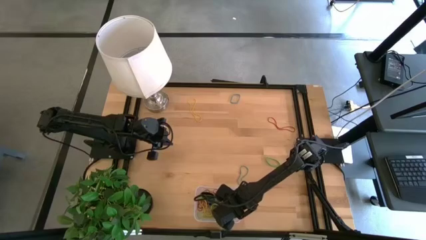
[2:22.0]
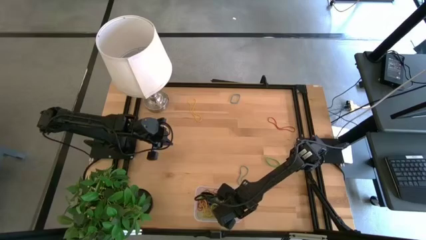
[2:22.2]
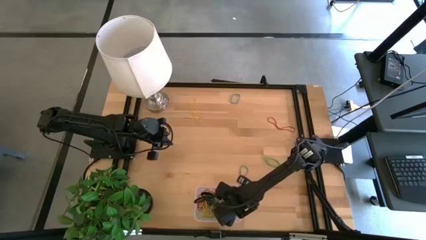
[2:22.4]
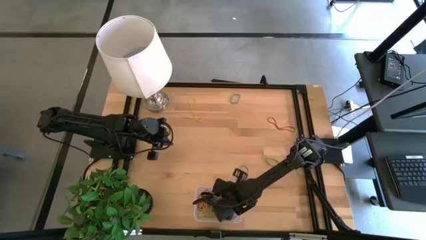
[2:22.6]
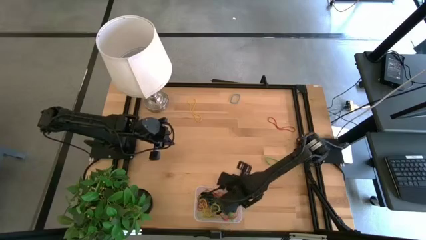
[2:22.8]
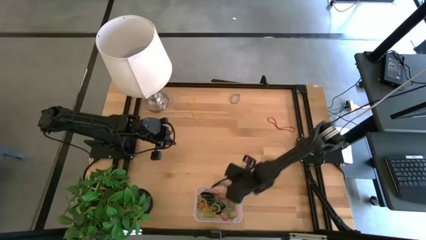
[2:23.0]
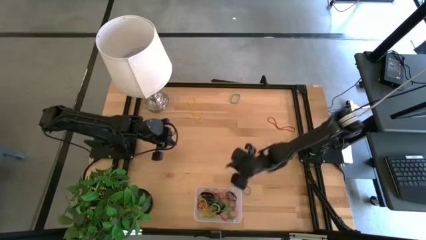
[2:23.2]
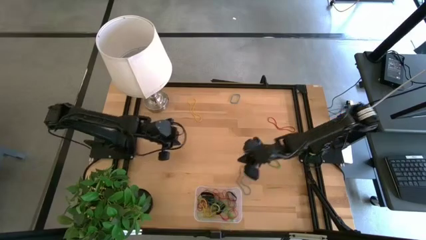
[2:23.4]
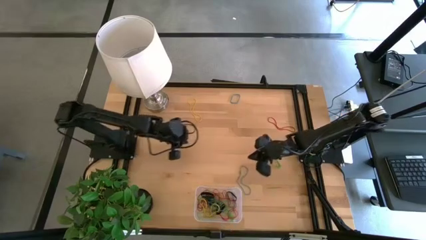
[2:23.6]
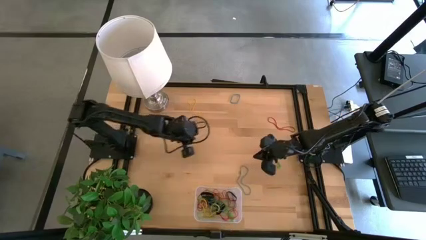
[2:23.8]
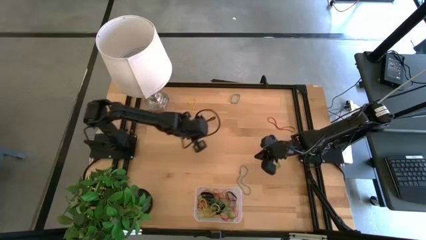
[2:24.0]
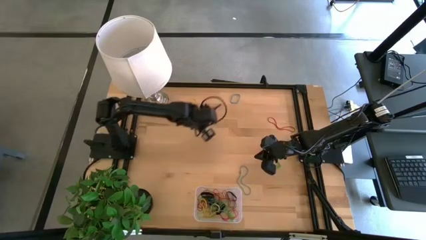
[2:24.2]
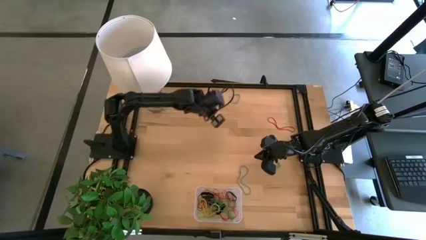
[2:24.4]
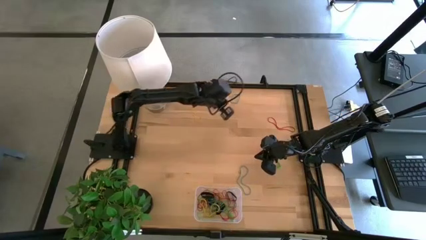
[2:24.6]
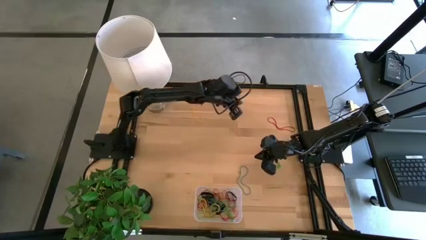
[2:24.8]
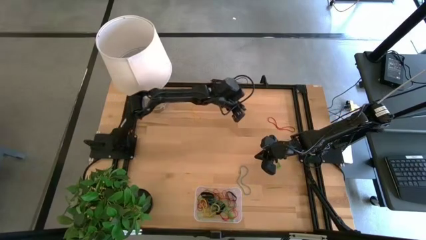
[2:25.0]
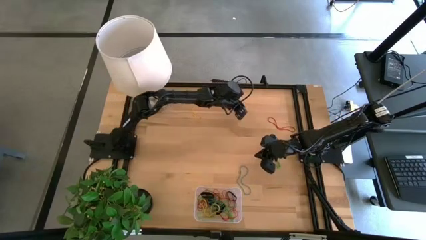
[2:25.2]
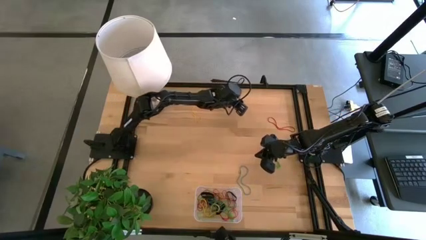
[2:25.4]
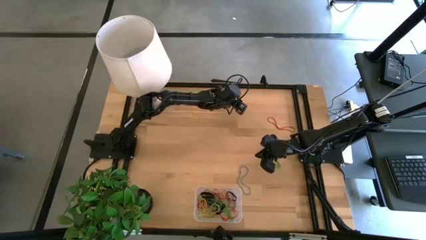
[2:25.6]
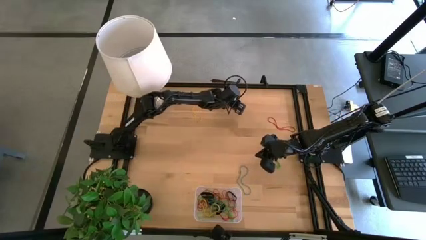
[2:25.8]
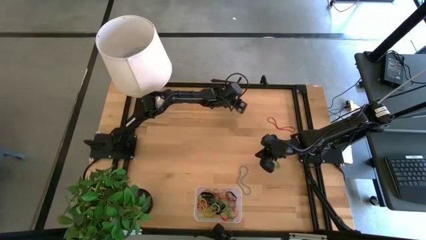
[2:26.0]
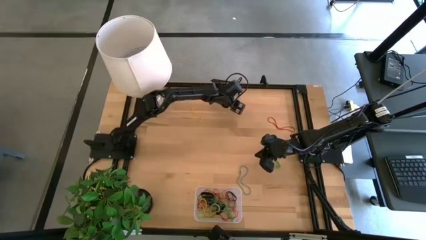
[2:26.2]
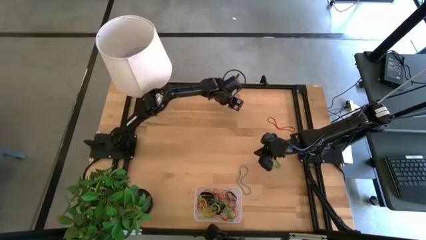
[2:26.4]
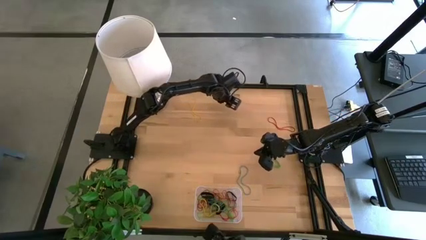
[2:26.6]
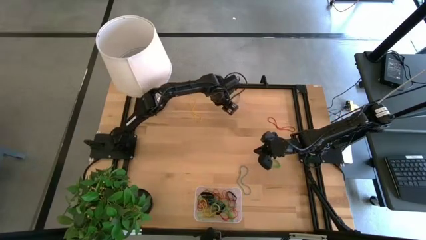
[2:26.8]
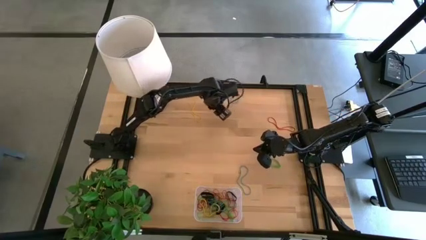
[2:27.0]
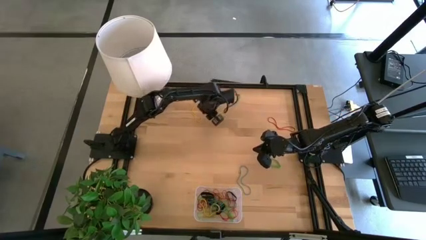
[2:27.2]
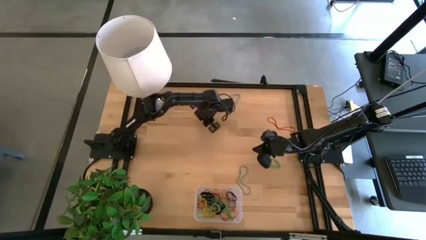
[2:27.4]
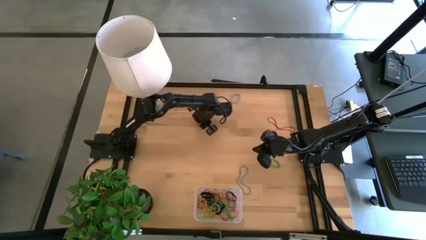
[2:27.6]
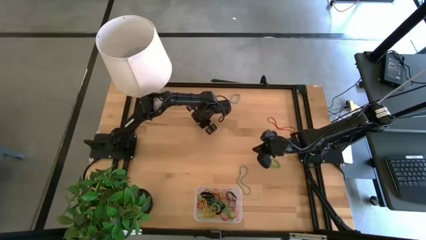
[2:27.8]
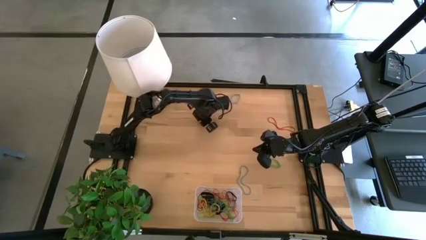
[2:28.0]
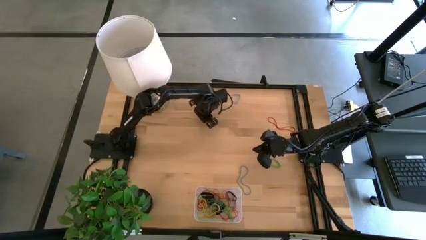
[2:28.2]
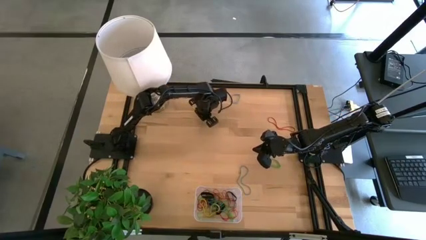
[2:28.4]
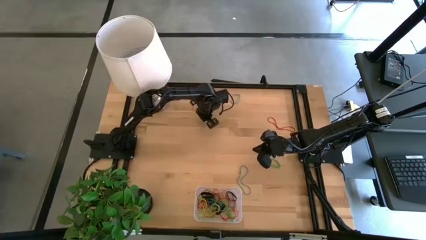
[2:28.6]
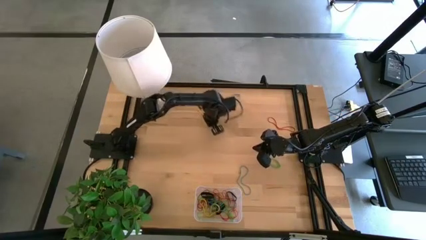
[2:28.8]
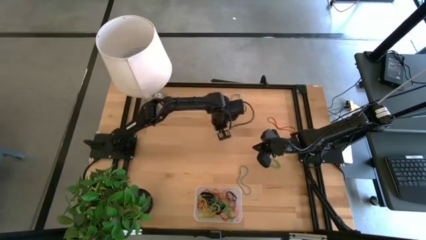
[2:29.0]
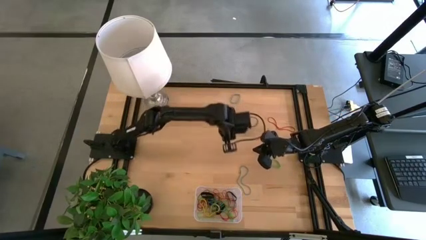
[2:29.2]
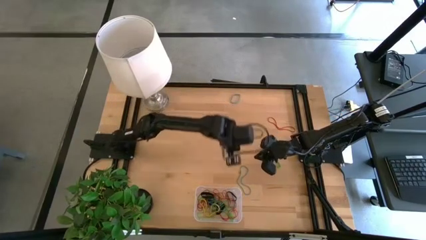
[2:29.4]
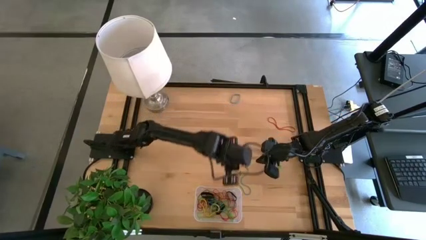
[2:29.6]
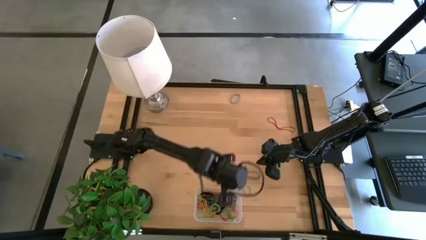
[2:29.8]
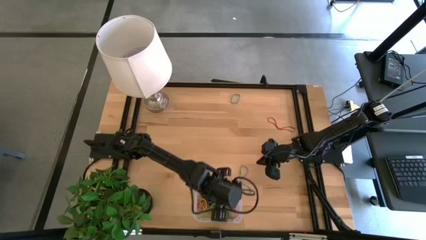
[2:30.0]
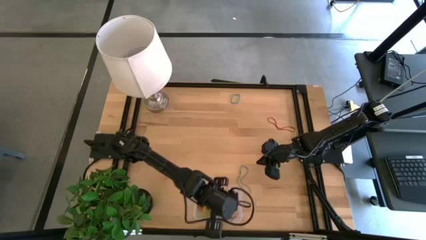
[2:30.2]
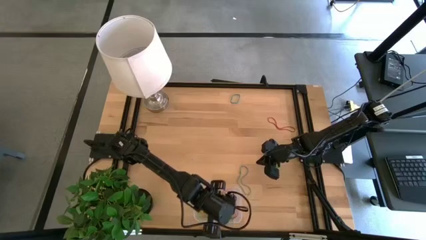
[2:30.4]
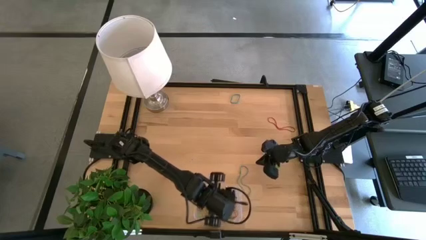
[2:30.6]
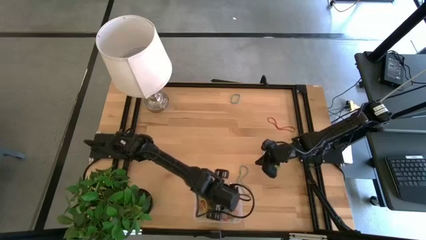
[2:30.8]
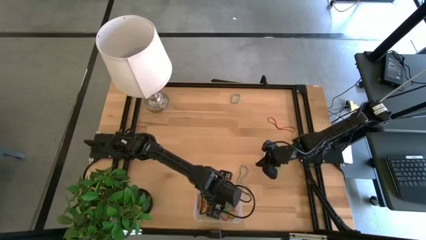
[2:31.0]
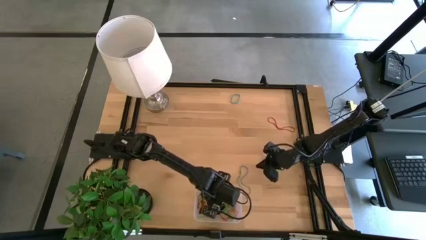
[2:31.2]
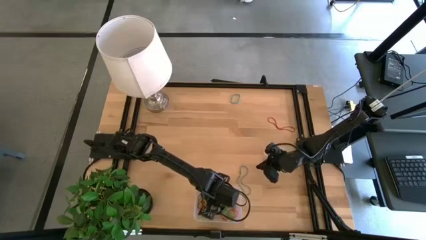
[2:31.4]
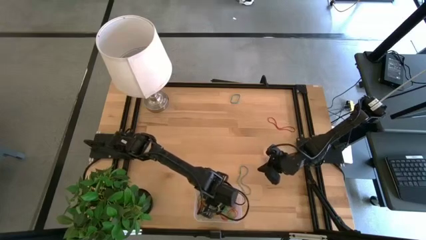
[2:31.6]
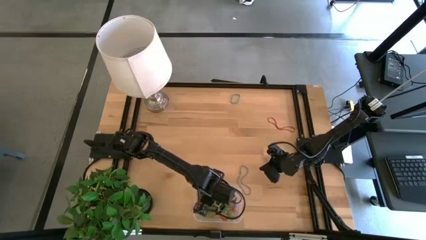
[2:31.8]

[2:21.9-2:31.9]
Task: Pick and place rubber bands into bin
Put the yellow rubber band into the transparent bin

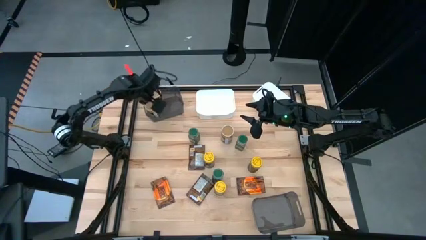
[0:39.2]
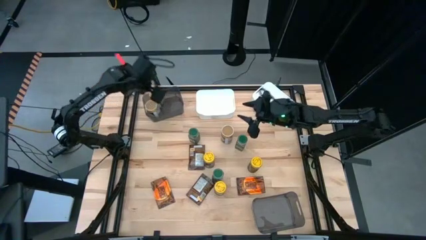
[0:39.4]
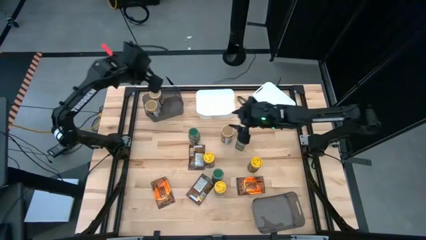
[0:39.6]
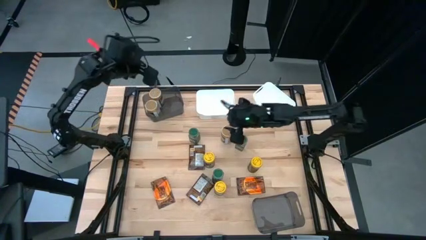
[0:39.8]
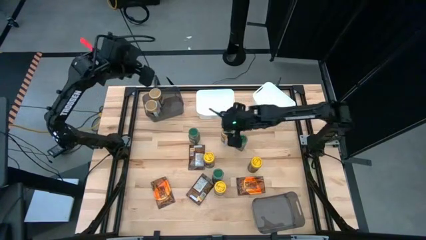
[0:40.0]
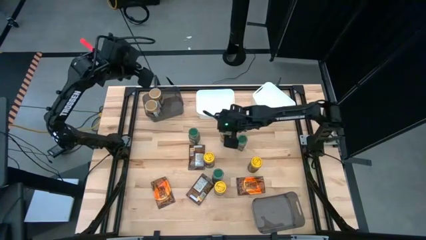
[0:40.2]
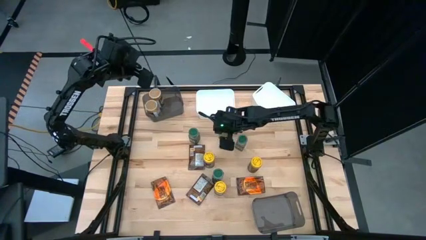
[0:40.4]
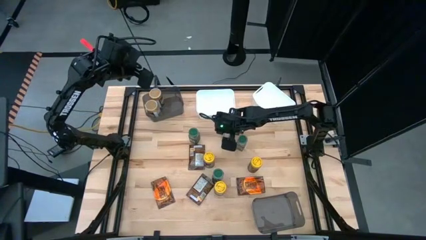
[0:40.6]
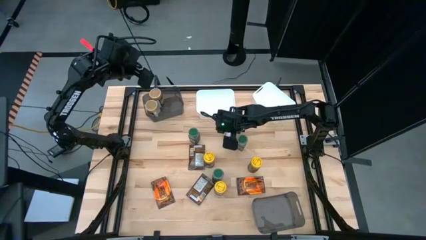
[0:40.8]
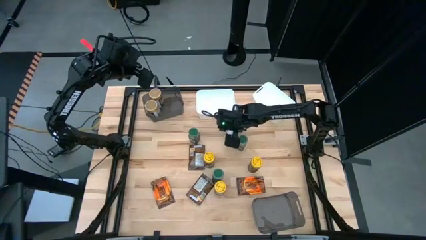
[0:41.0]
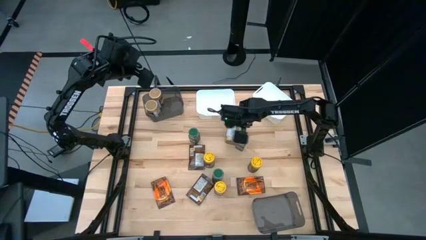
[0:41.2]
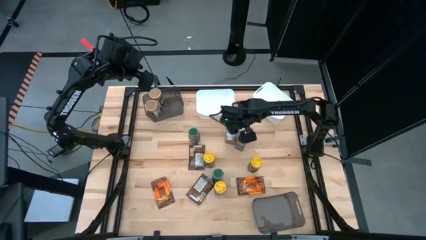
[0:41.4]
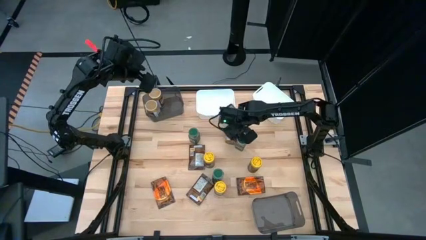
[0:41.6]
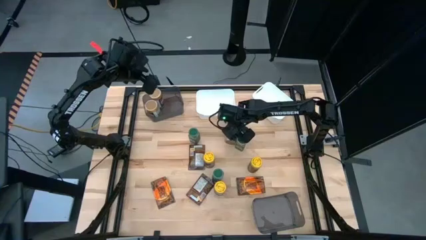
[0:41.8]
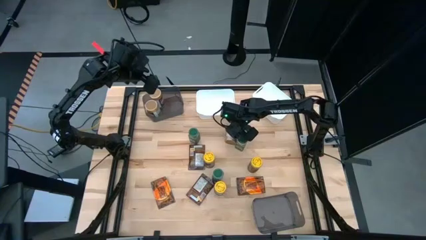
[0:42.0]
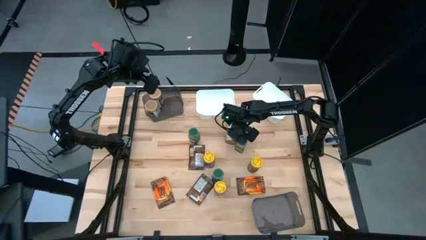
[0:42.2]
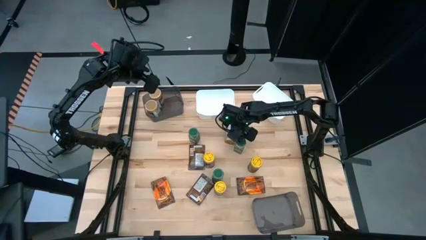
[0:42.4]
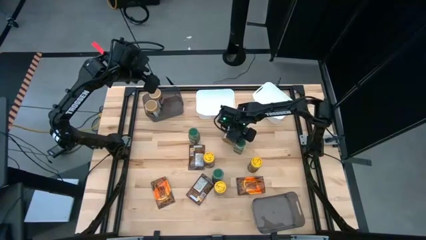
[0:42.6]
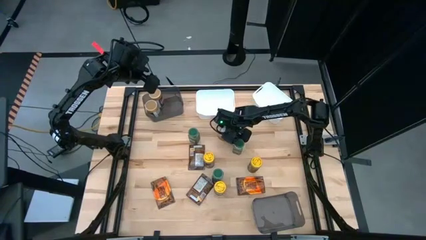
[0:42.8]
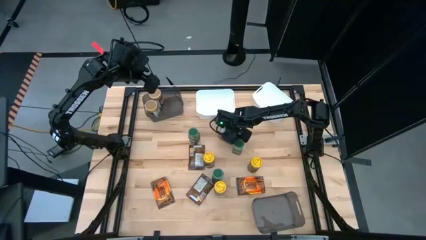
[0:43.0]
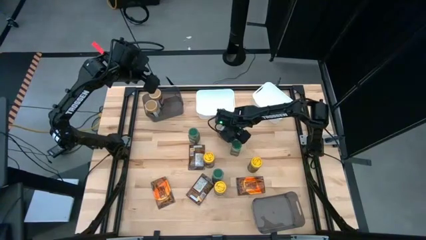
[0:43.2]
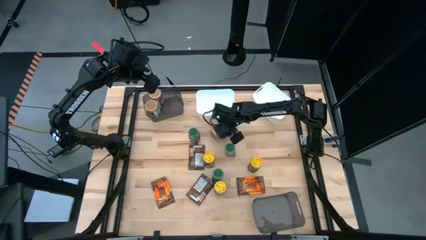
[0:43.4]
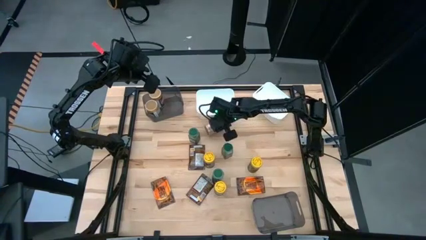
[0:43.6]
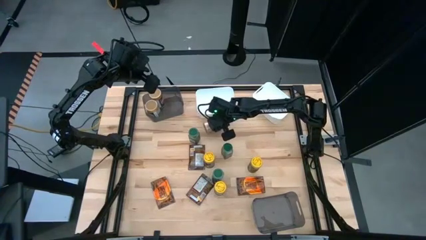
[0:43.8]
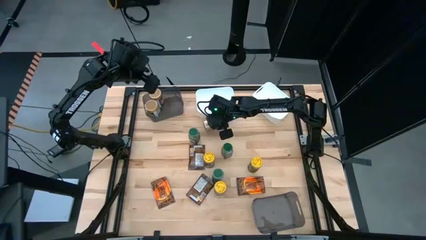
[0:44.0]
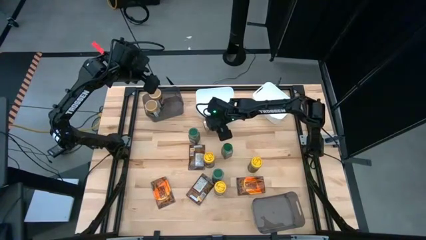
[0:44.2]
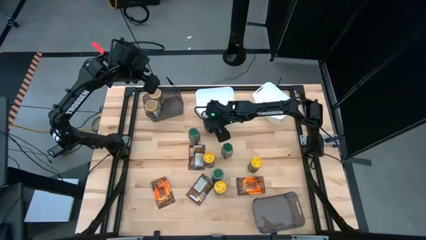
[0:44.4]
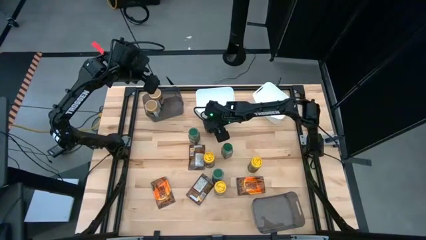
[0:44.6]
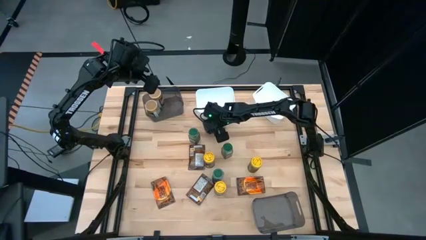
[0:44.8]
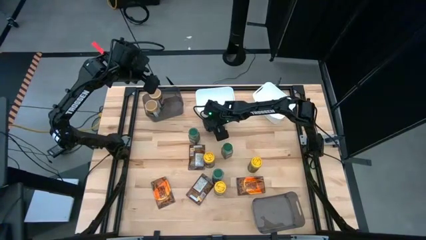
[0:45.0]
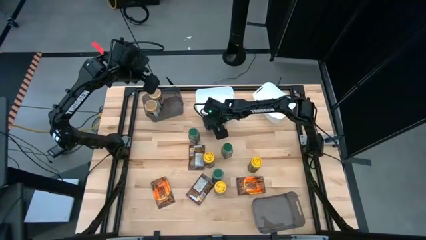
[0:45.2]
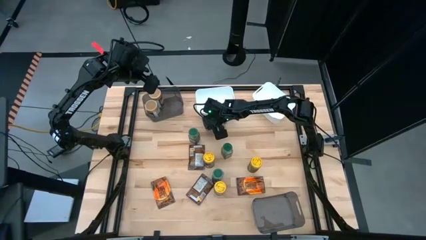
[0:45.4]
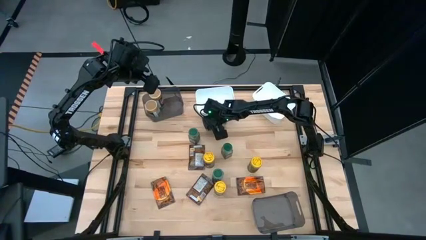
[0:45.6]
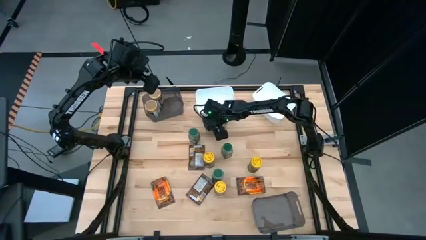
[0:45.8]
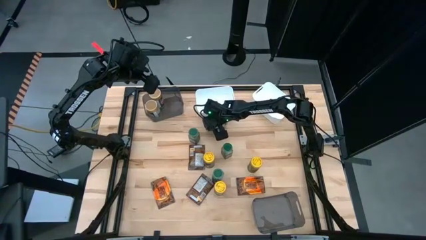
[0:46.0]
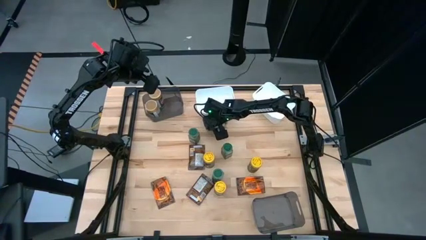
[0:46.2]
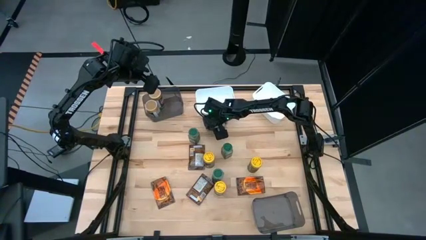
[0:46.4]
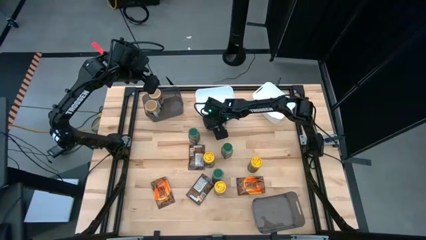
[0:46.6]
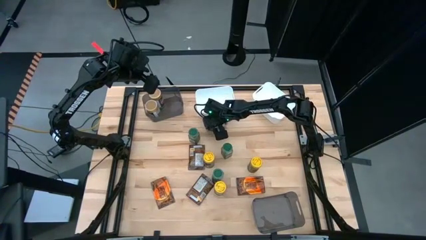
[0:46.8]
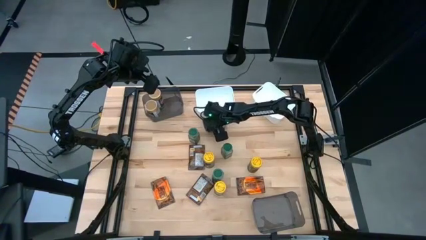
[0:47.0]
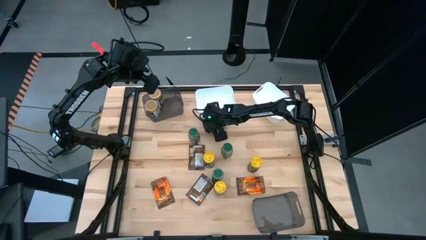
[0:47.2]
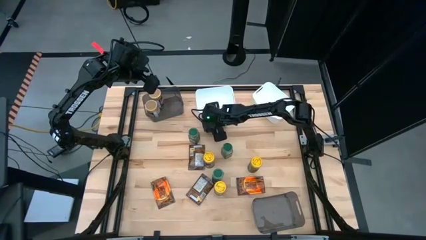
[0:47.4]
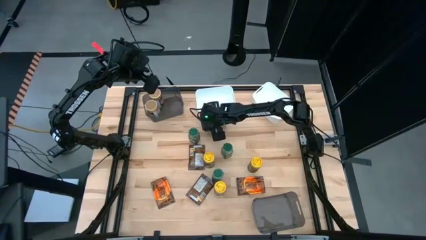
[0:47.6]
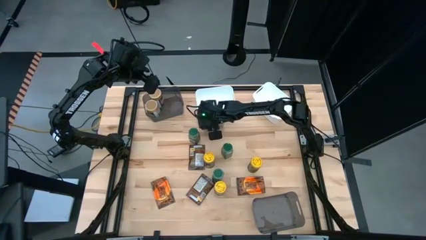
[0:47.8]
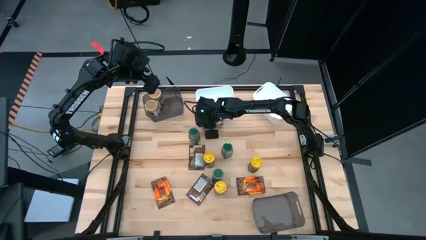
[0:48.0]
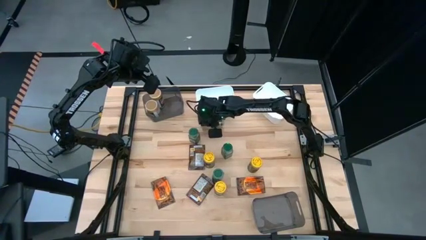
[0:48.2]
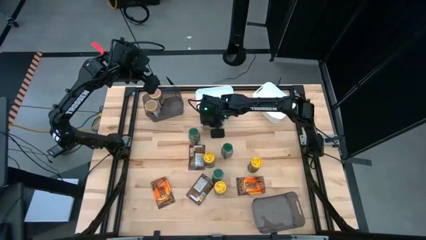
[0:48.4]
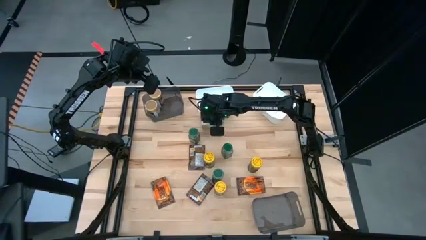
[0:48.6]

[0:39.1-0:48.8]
Task: Sort spices by type
Put the gold seasoning bottle into the top black bin
